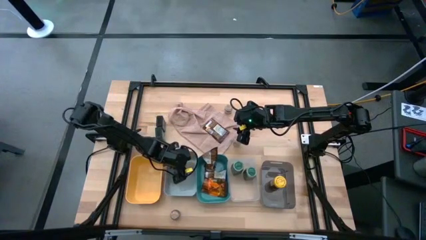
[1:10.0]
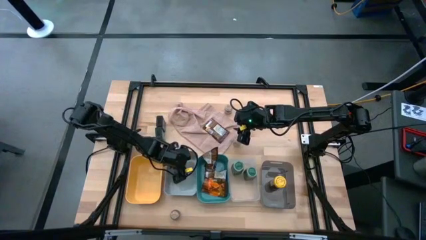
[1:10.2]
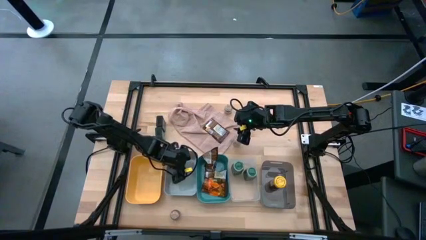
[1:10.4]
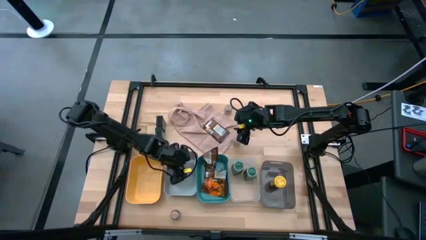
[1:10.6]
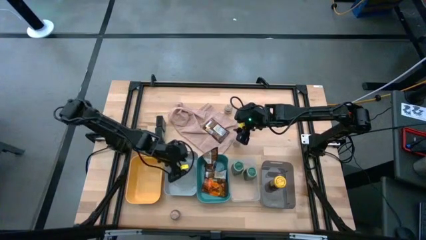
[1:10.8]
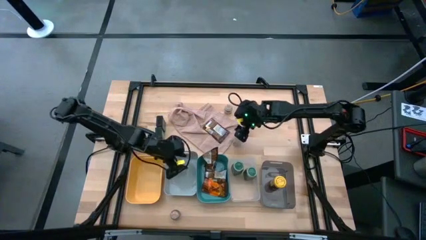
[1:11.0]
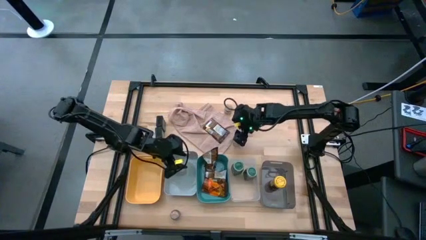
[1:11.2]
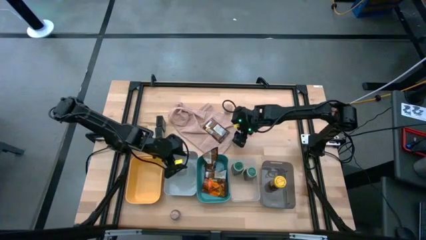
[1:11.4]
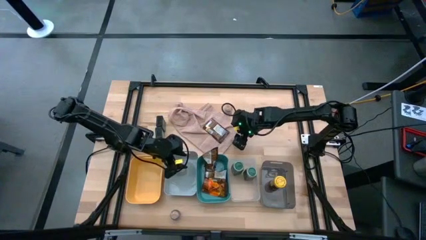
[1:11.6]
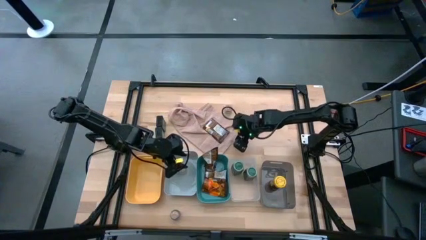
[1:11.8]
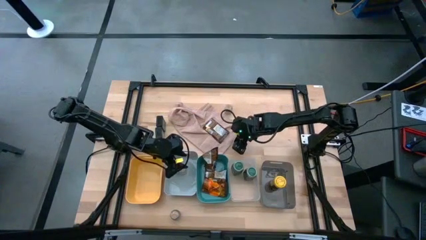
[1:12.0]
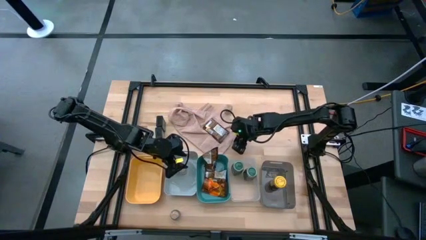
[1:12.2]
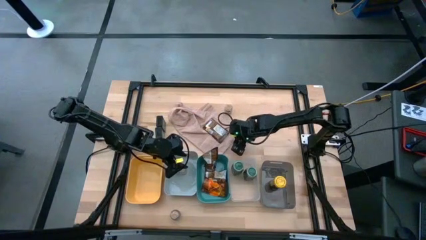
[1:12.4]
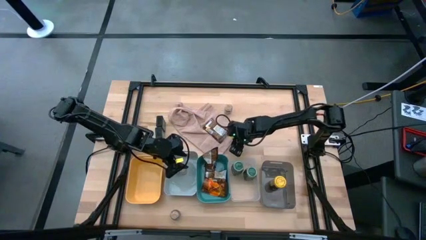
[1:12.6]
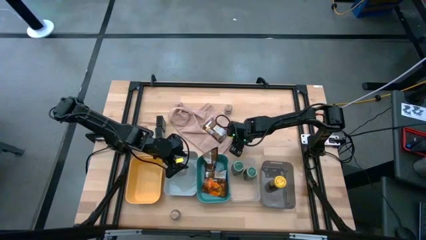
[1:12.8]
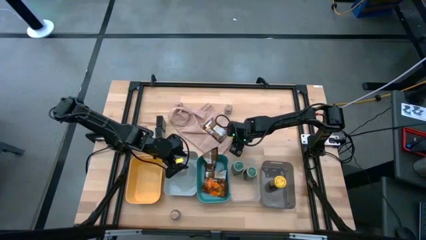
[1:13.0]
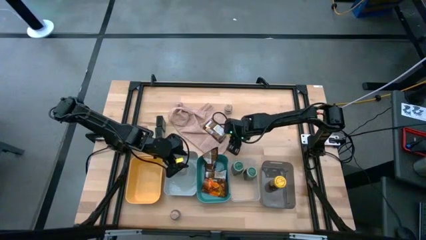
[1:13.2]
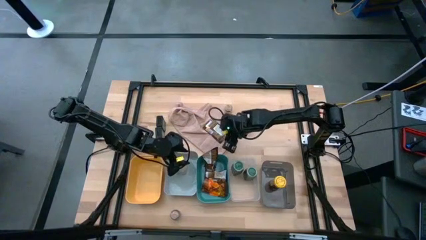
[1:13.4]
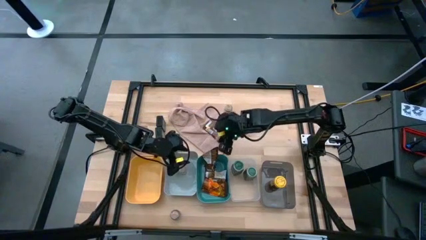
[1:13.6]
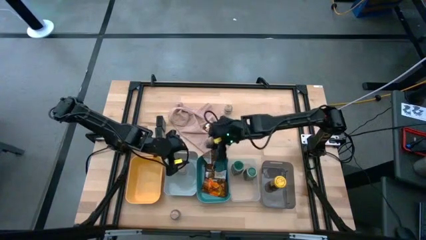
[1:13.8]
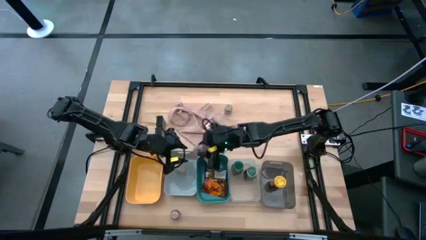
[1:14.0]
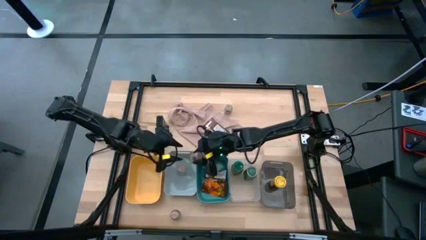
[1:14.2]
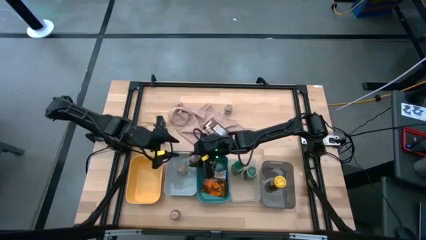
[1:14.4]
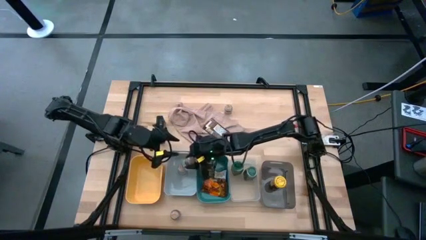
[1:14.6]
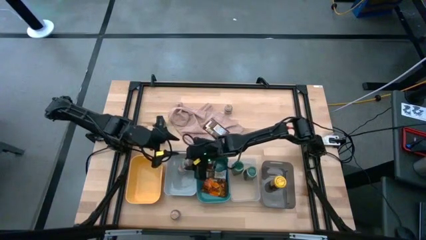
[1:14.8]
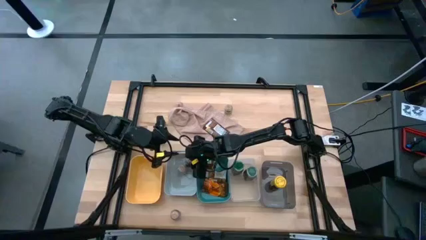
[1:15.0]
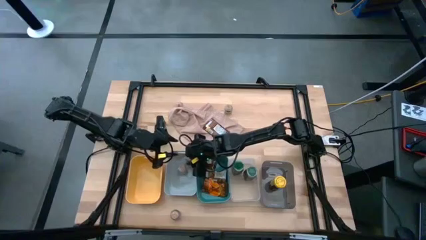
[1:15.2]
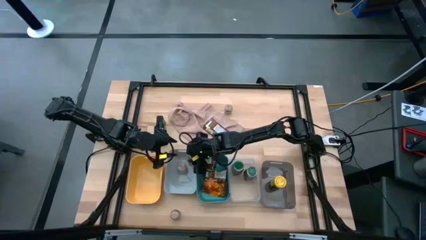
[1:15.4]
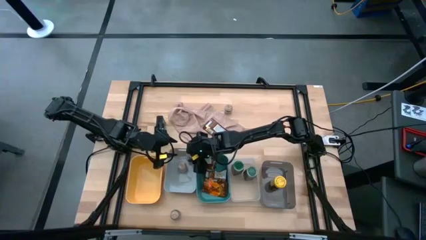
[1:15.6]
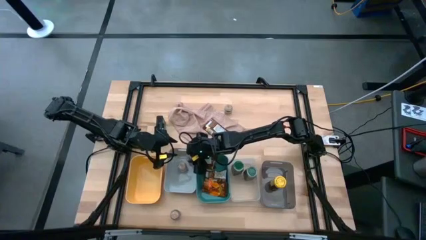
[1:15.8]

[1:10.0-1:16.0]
Task: Sort spices by type
Put the brown seasoning bottle into the gray bin

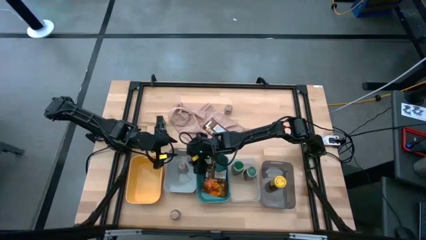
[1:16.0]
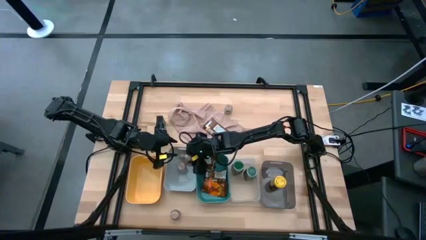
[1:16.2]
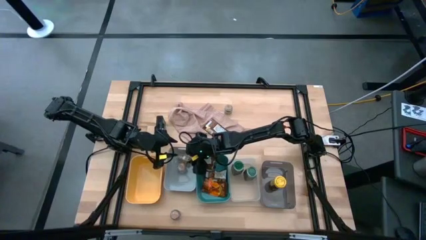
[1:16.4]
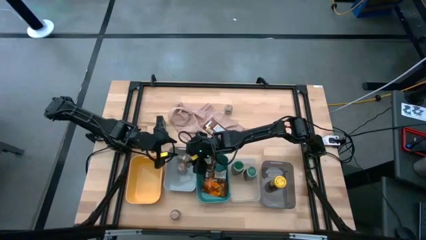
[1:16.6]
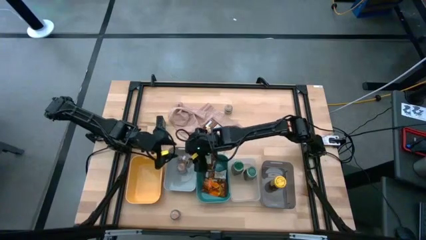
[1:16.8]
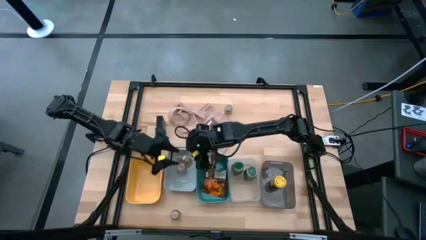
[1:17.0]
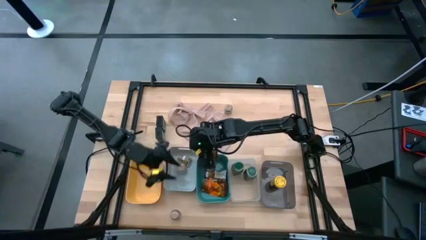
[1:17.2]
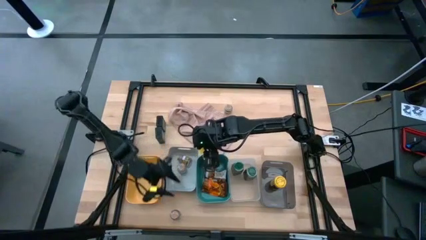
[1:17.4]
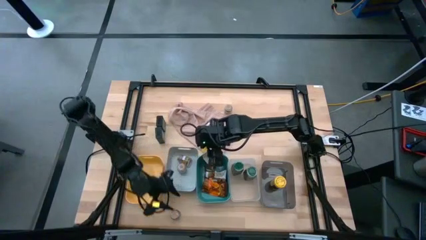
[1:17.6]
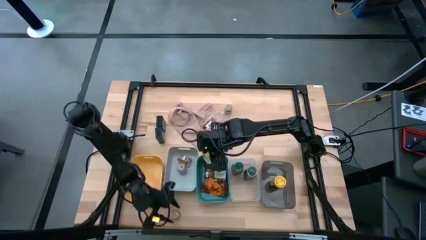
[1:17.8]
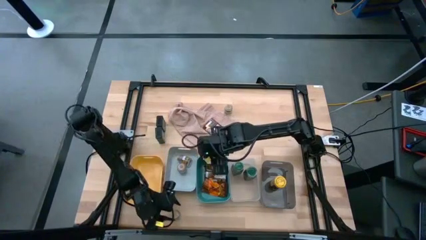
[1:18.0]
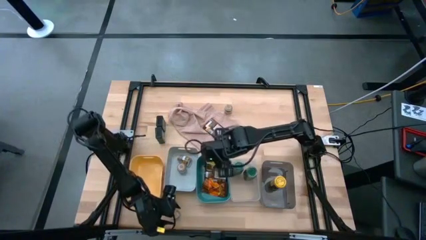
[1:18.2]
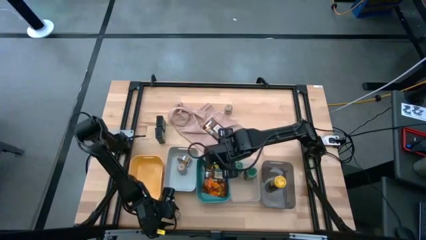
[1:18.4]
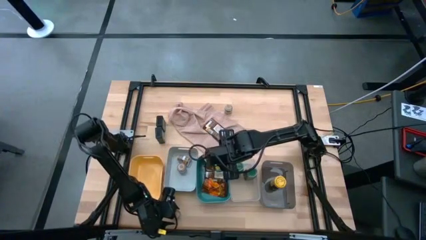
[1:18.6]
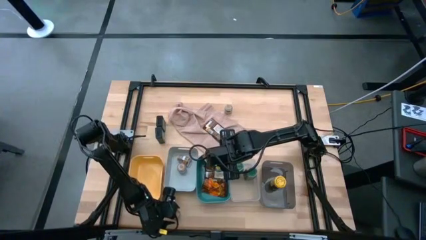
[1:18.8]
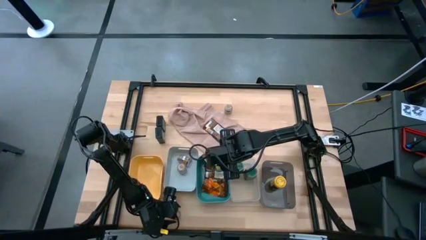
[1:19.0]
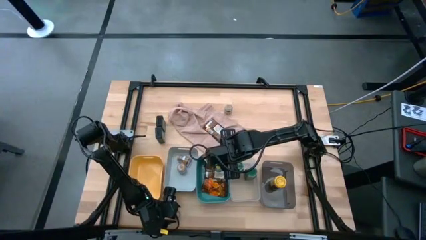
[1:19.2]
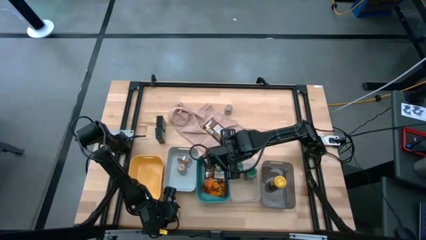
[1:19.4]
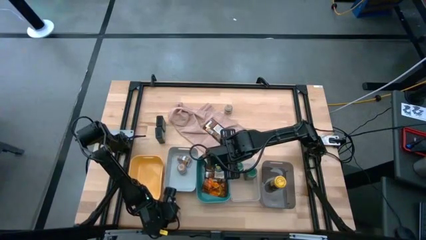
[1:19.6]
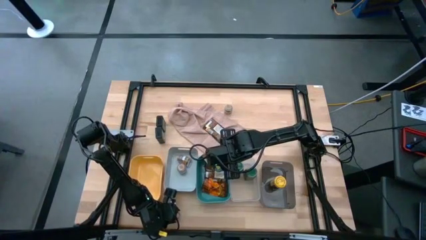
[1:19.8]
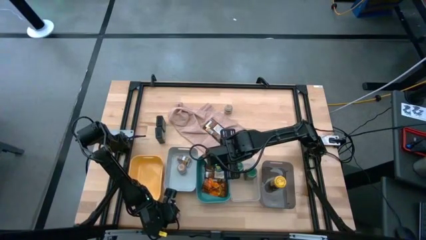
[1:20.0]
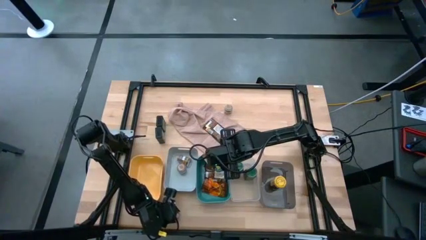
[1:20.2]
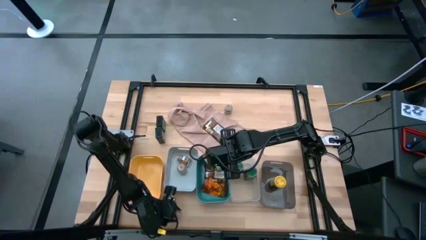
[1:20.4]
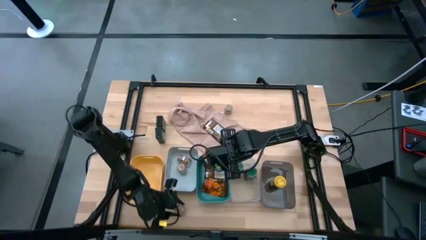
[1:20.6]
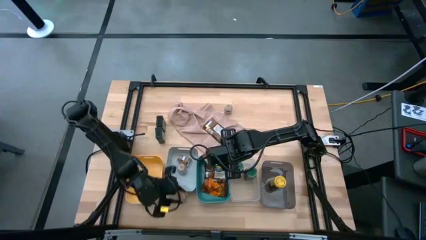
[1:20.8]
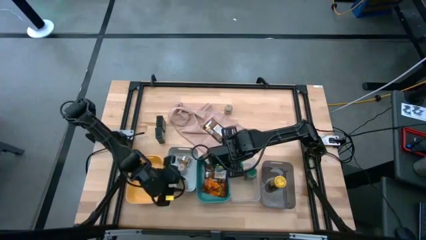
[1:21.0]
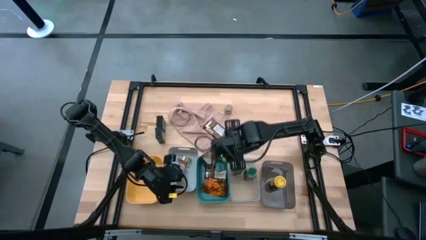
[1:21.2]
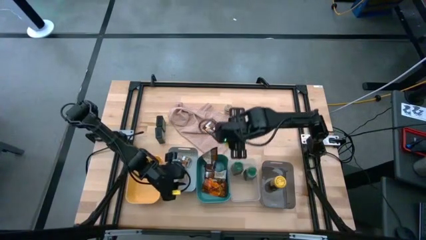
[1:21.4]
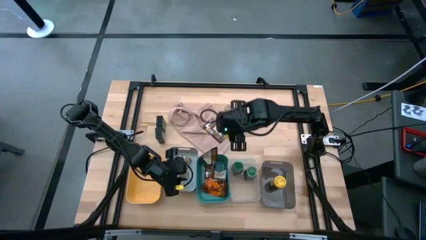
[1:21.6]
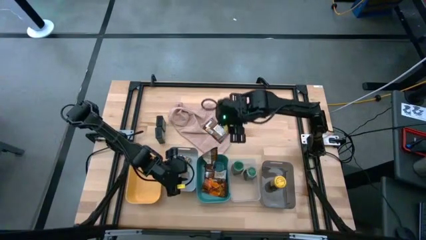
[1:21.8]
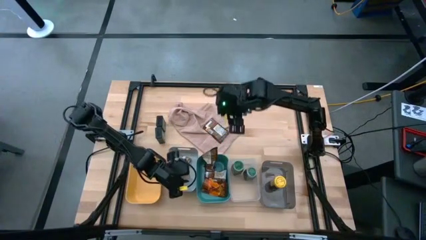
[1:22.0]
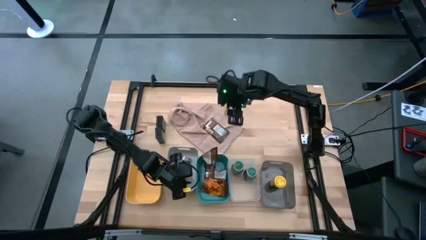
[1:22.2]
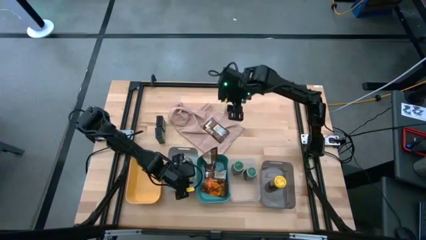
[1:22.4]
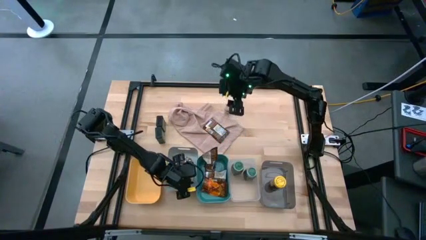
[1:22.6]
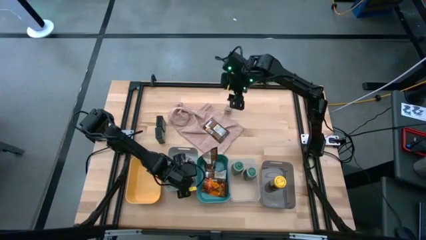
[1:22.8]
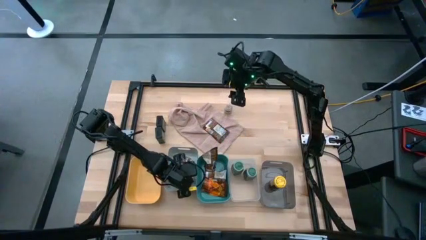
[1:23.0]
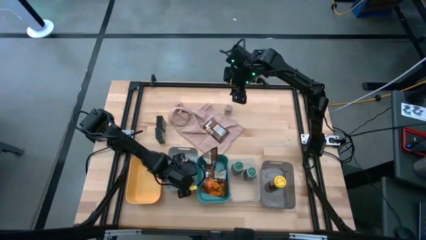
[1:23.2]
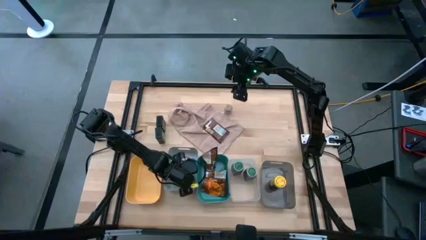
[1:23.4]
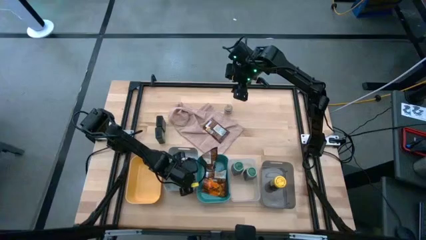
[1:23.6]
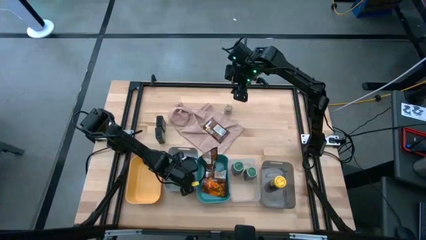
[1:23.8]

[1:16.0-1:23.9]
Put the brown seasoning bottle into the gray bin
